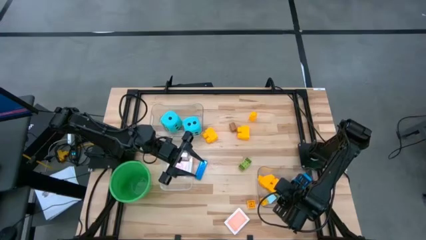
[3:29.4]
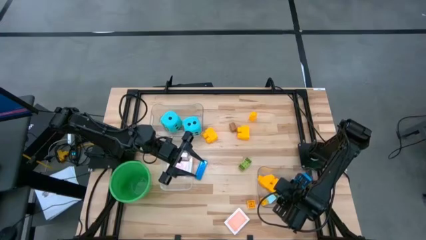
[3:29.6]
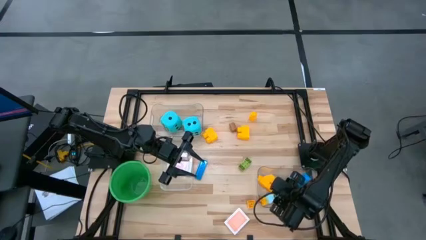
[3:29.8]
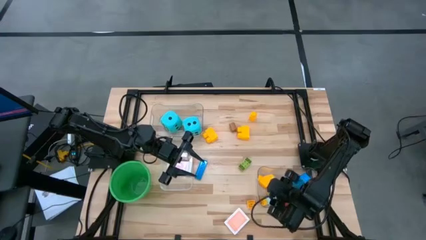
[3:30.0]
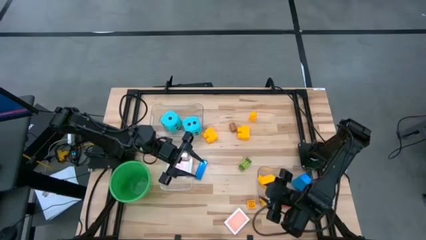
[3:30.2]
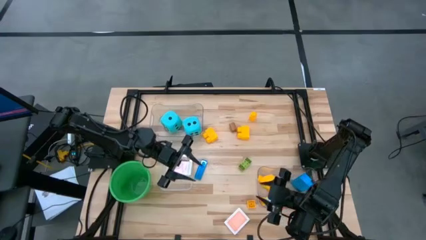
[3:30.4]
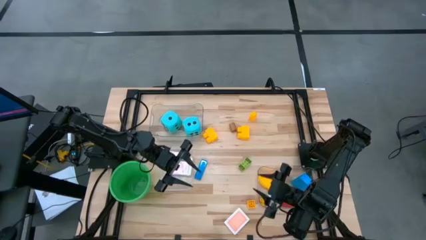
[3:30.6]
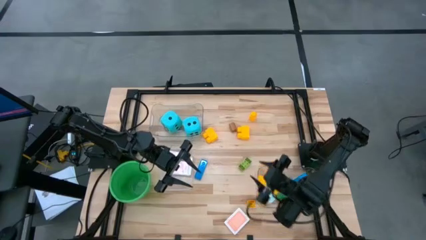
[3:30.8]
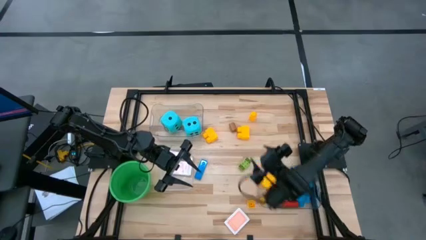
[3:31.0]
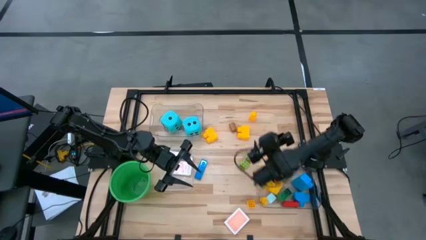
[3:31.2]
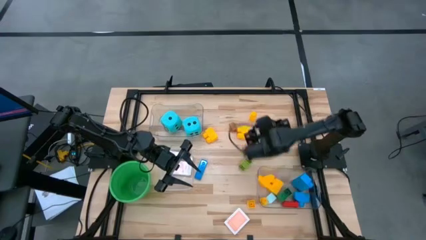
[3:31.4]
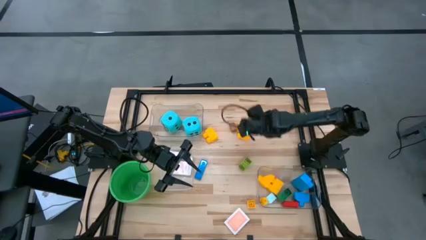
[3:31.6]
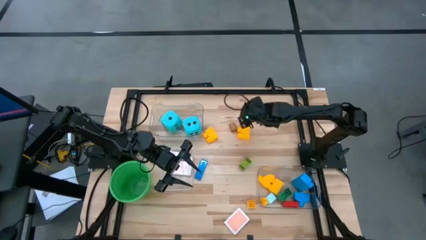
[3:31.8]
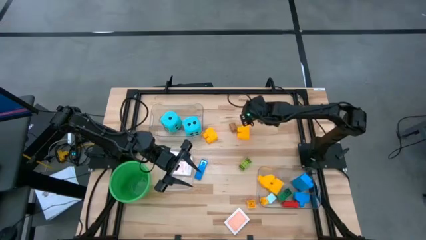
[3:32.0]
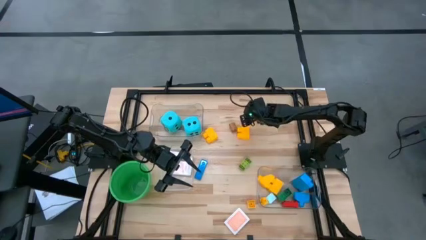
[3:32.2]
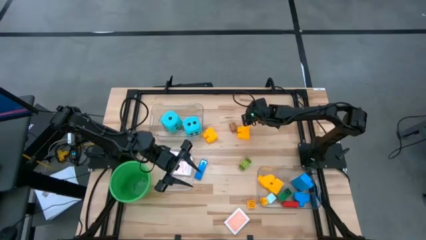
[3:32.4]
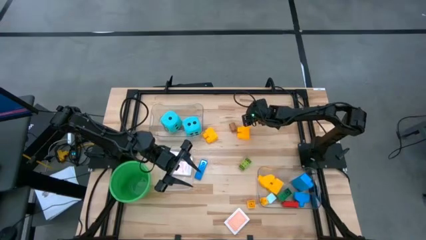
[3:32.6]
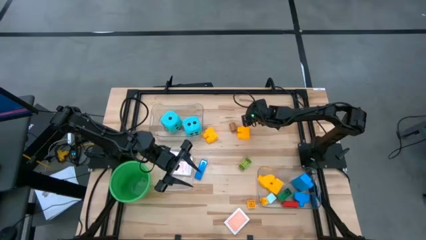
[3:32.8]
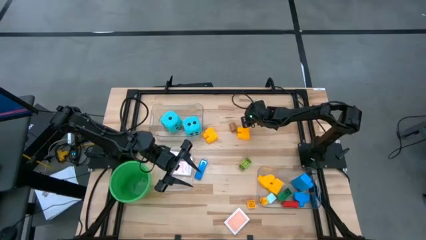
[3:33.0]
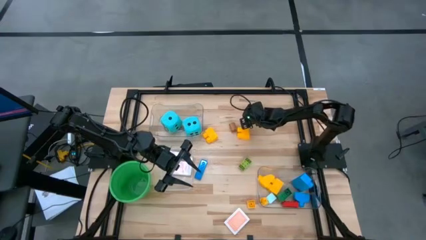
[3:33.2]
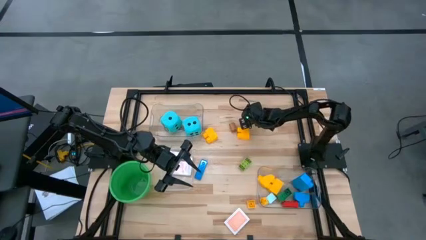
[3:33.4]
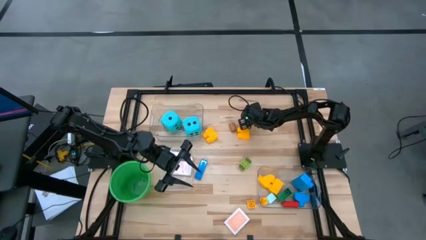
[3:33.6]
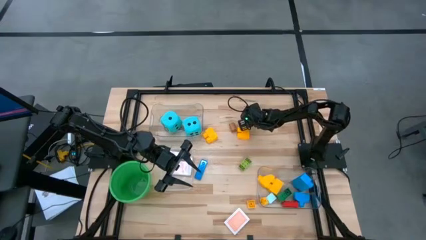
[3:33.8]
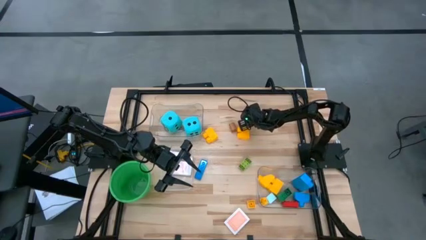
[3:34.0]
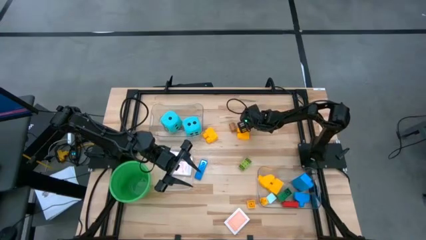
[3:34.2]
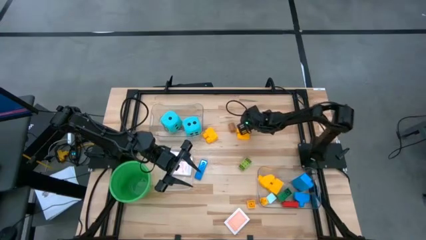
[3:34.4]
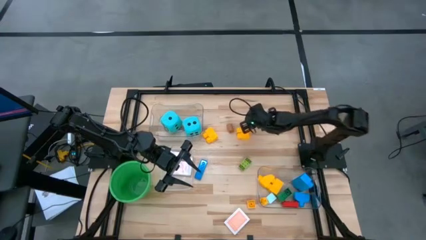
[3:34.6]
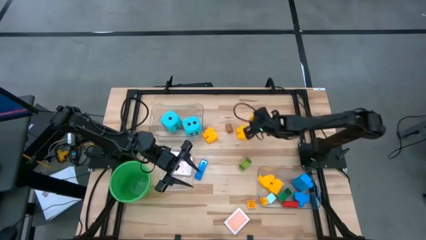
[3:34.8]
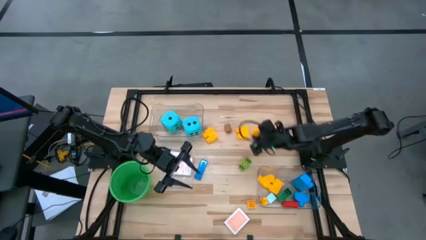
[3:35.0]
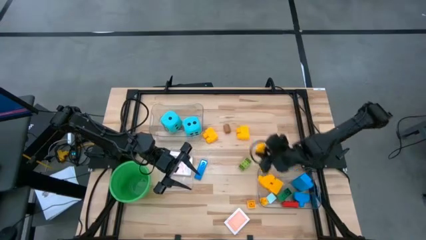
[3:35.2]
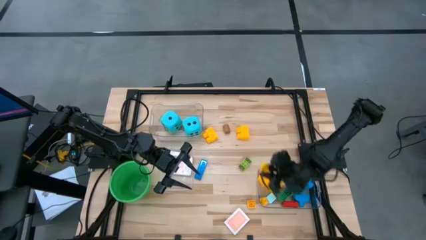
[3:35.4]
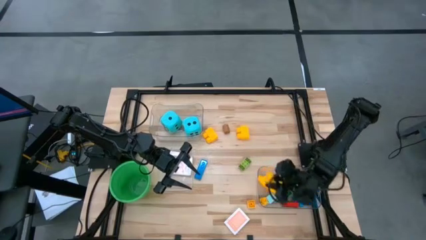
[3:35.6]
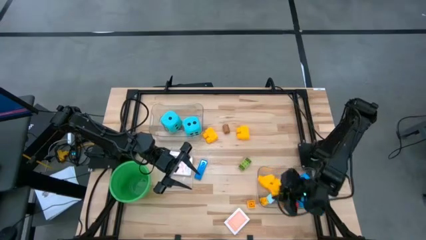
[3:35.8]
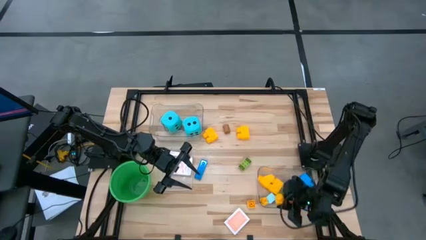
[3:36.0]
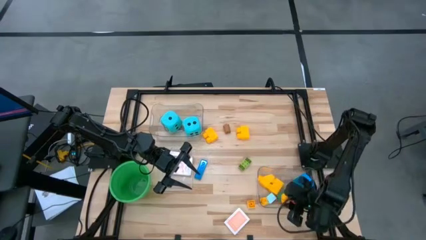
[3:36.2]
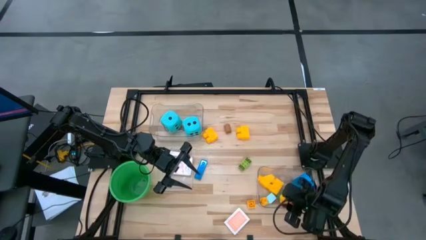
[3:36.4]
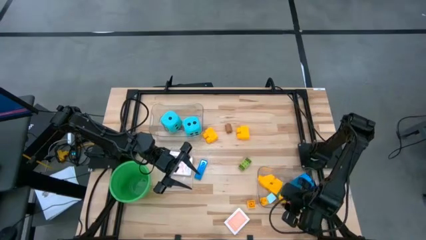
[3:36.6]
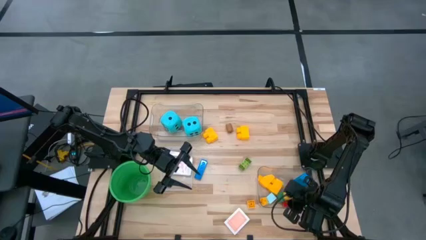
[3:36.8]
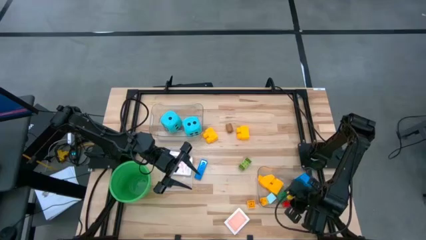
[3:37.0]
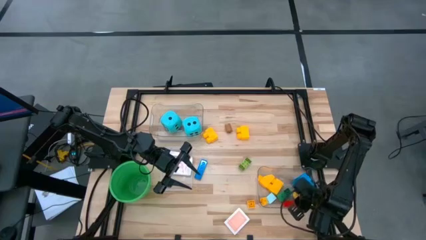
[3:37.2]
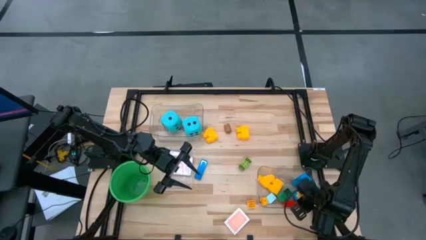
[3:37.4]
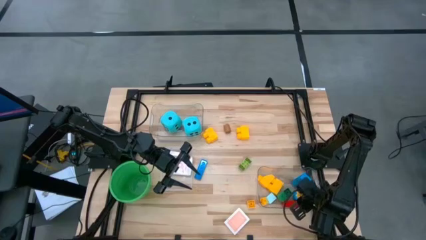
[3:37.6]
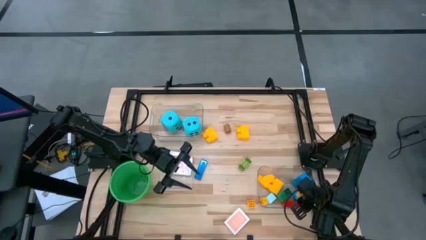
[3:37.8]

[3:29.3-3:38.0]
Task: Pick & Place Toys
Put the yellow game piece into the bottom right transparent bin

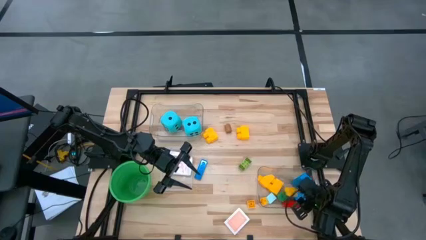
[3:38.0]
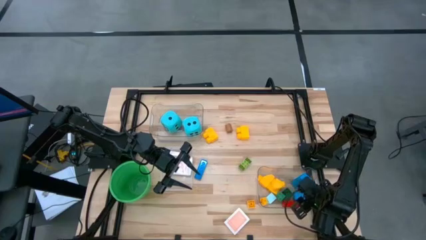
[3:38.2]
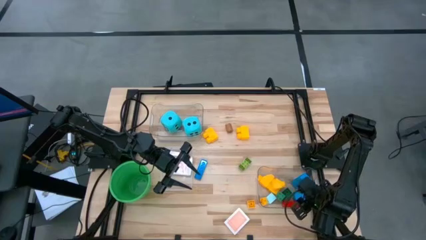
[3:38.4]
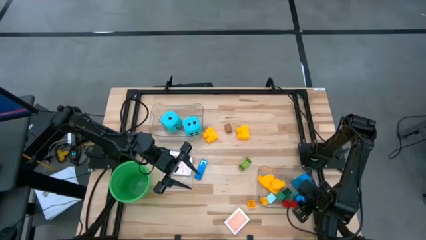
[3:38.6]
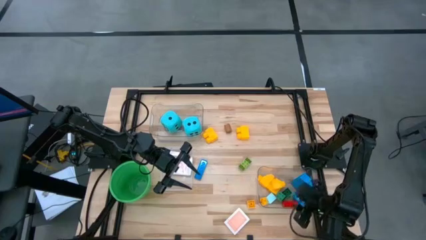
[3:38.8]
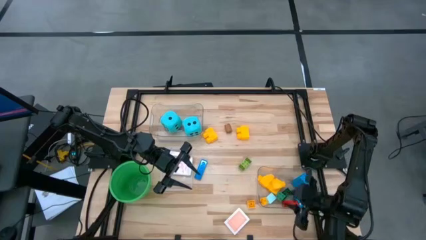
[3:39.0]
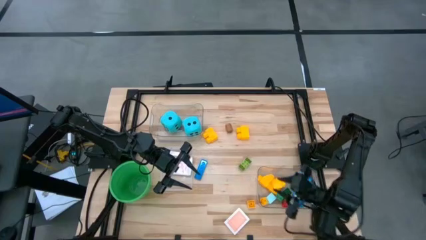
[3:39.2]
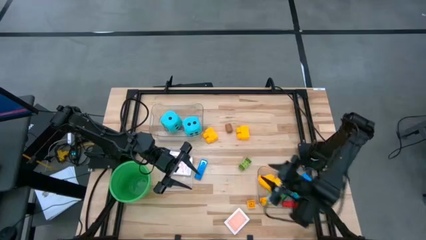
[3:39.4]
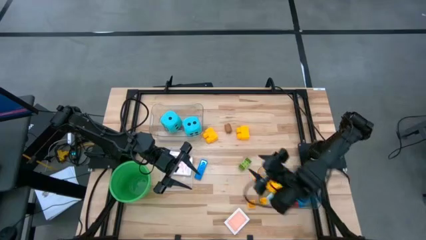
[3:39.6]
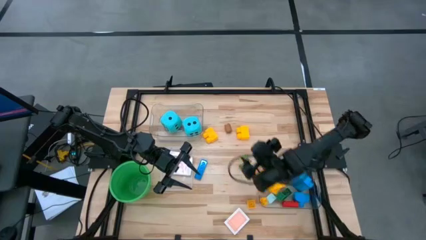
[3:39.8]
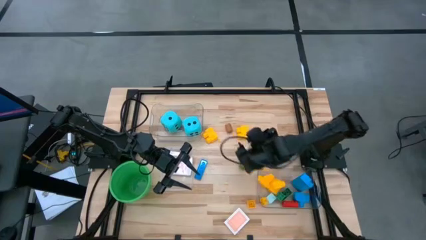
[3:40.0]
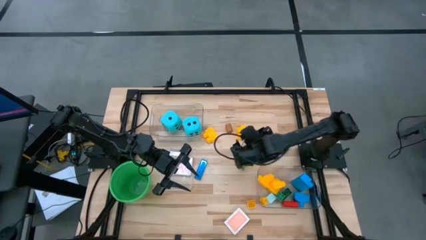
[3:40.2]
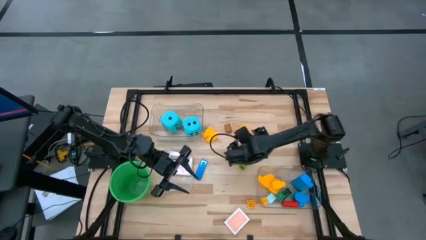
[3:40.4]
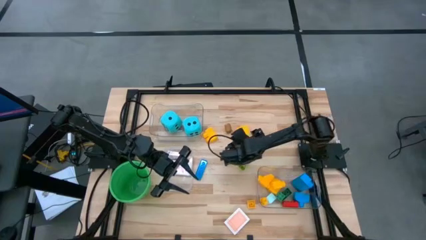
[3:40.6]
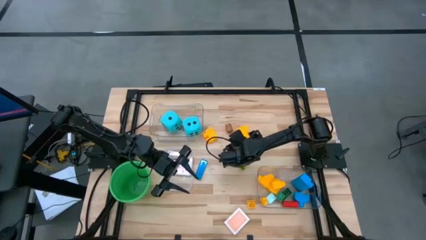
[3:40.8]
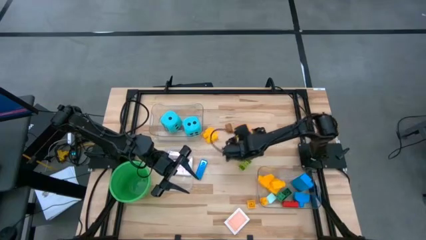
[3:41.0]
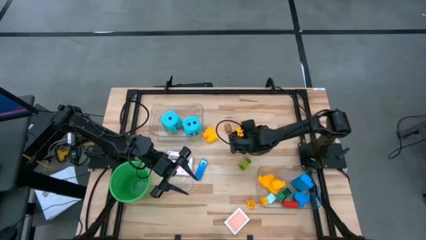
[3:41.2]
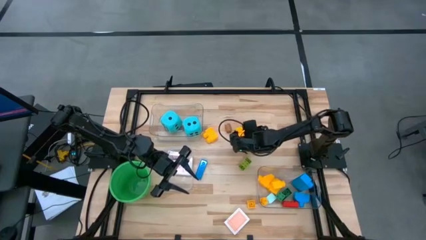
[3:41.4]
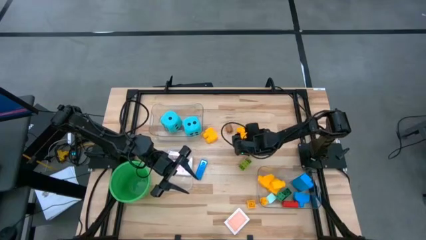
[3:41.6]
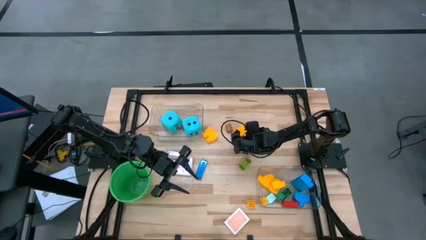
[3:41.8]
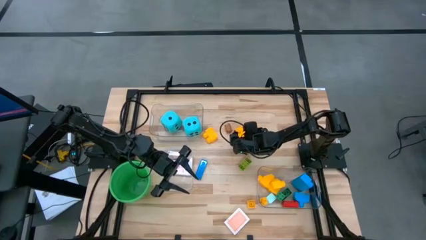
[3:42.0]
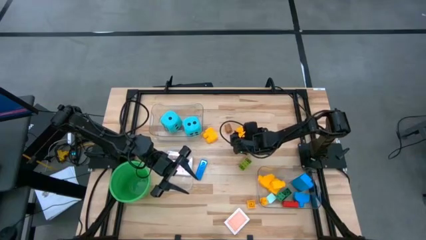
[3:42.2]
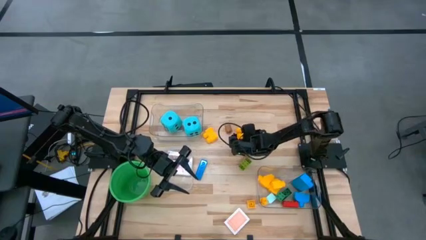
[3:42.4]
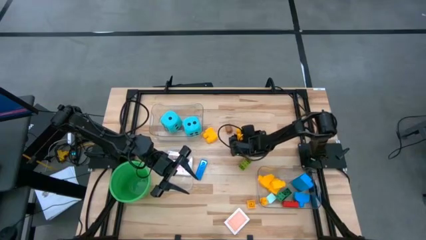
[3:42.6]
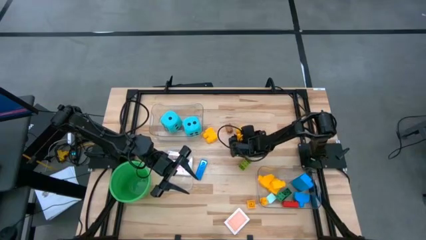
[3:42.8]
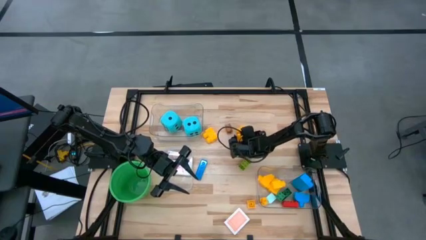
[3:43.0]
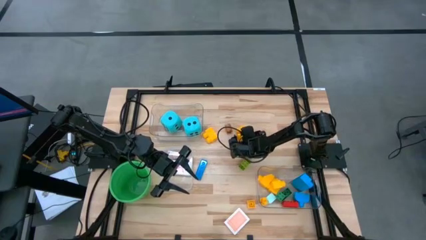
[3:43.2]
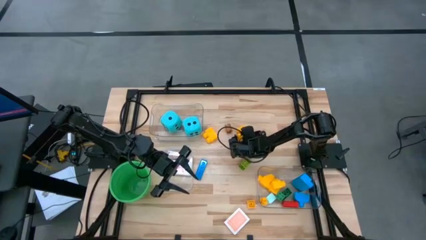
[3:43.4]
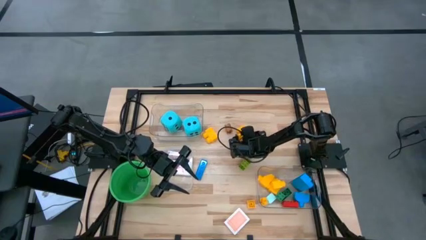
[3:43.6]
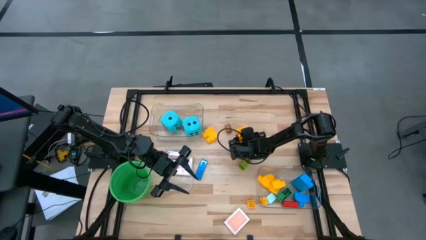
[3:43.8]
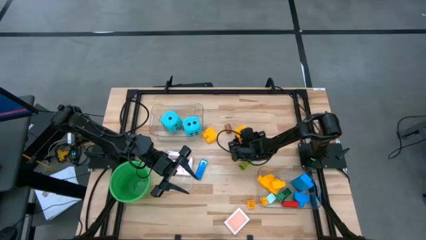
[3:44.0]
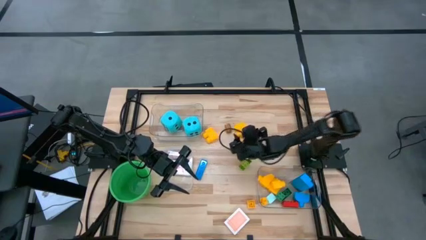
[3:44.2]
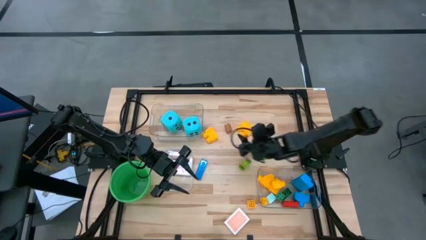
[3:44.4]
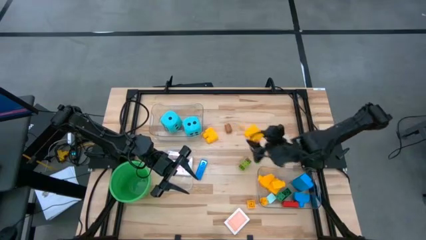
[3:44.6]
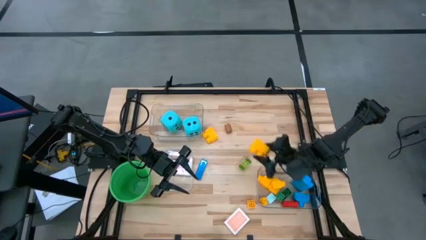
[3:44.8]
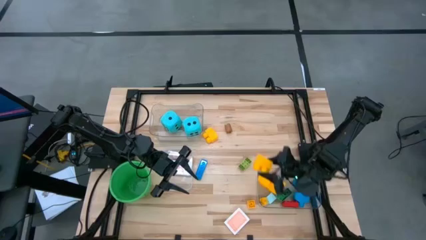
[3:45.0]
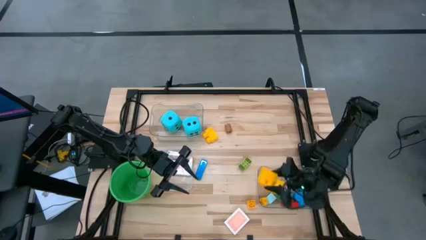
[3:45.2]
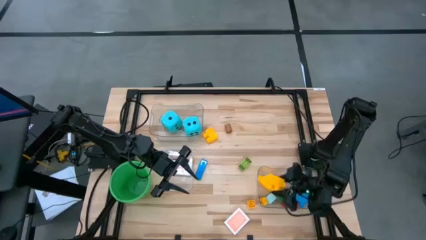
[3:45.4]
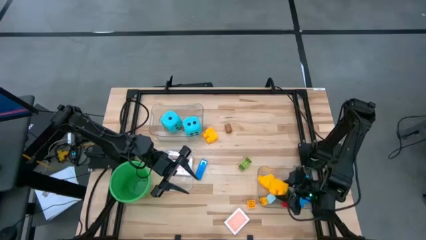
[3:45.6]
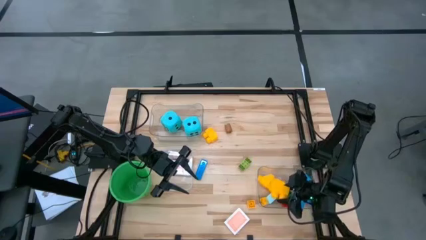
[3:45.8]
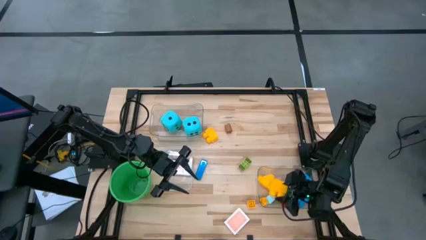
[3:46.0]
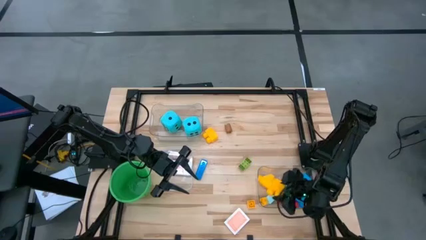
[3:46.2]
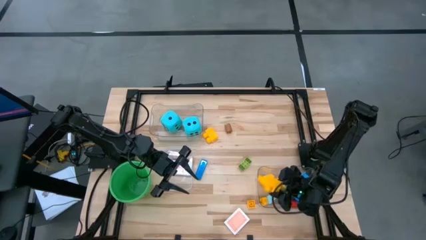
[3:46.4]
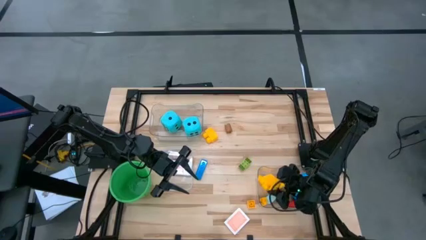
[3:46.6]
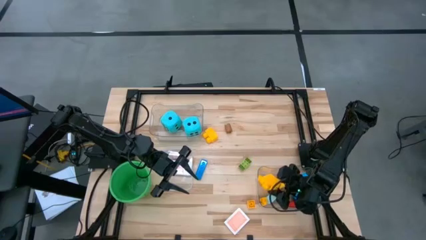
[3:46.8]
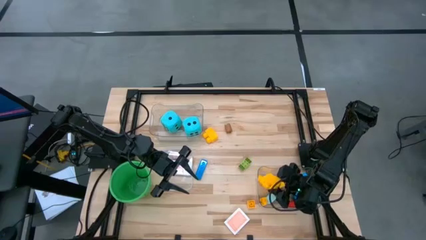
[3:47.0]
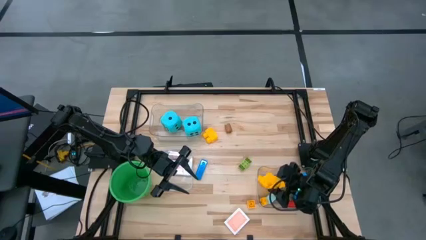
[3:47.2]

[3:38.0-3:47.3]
Put the yellow game piece into the bottom right transparent bin
